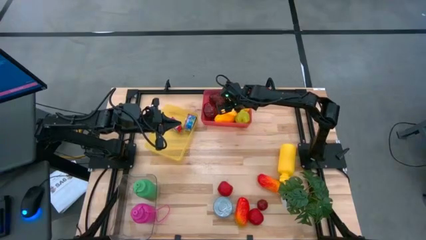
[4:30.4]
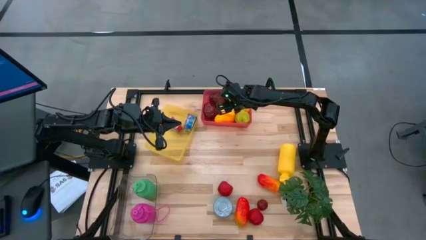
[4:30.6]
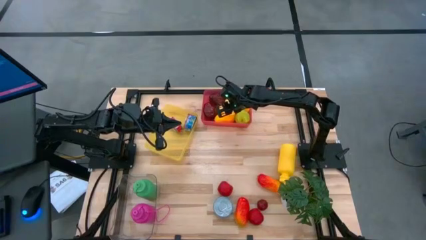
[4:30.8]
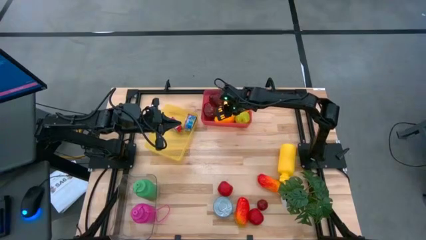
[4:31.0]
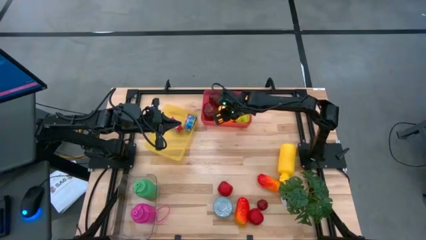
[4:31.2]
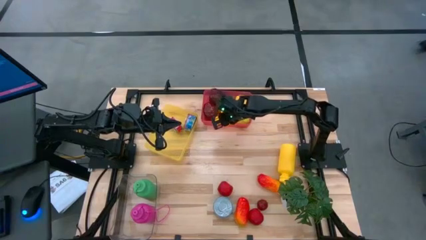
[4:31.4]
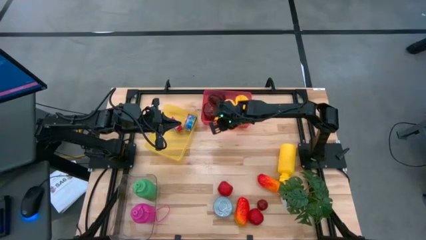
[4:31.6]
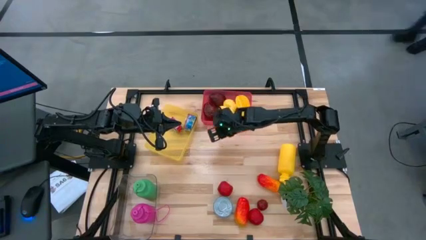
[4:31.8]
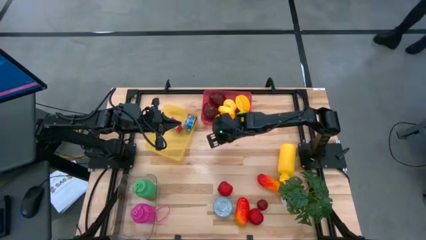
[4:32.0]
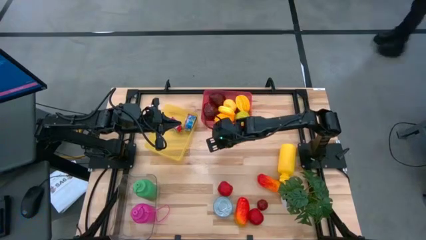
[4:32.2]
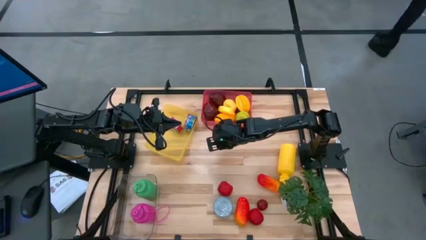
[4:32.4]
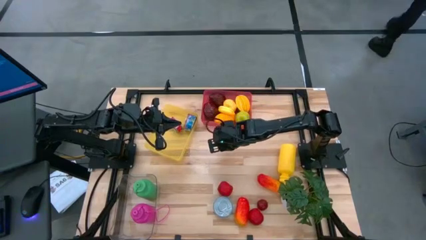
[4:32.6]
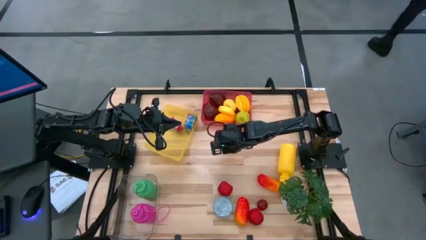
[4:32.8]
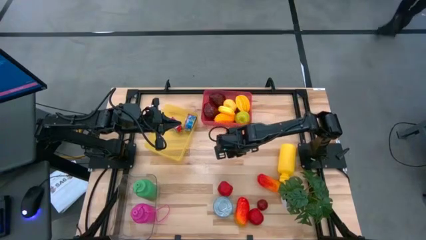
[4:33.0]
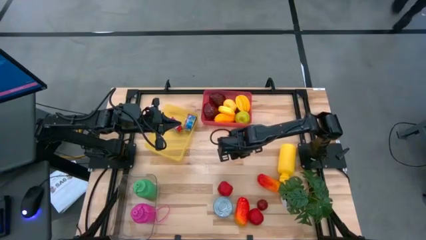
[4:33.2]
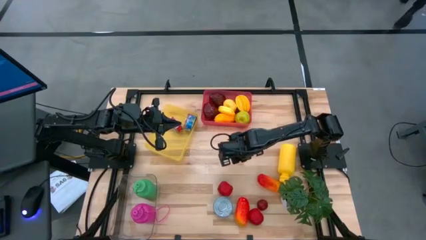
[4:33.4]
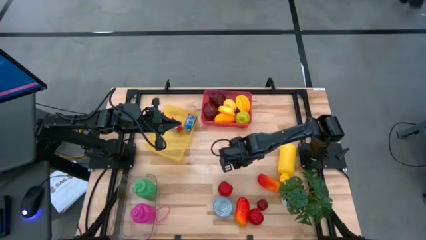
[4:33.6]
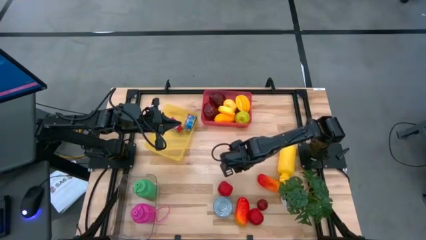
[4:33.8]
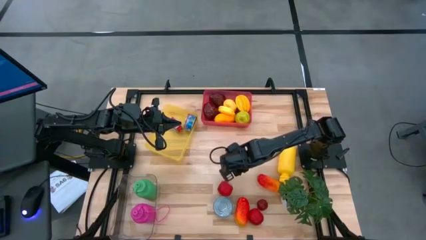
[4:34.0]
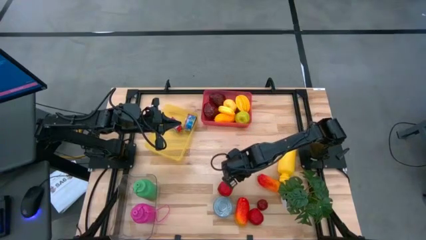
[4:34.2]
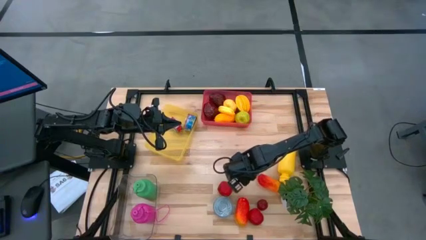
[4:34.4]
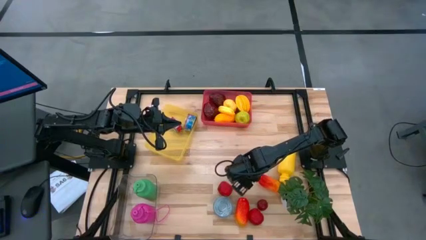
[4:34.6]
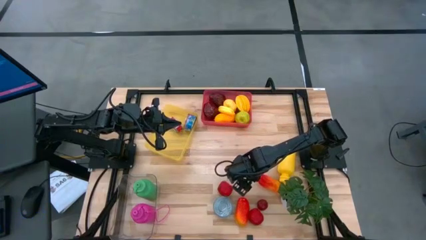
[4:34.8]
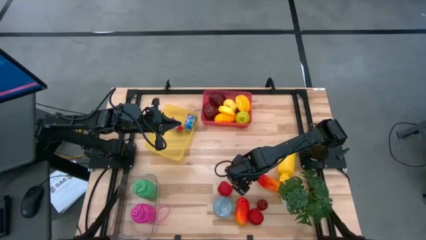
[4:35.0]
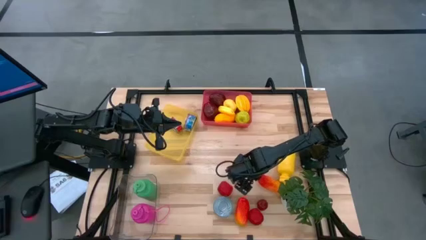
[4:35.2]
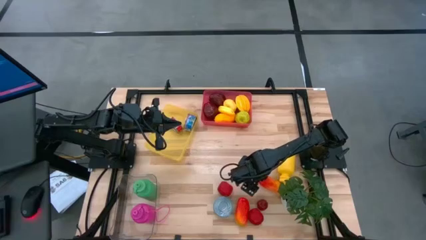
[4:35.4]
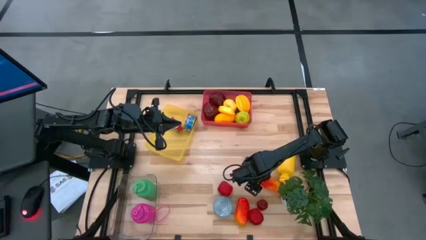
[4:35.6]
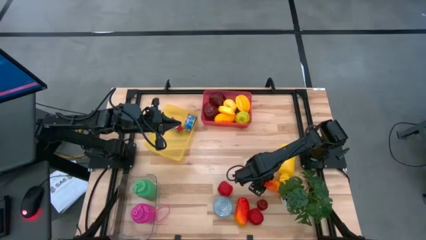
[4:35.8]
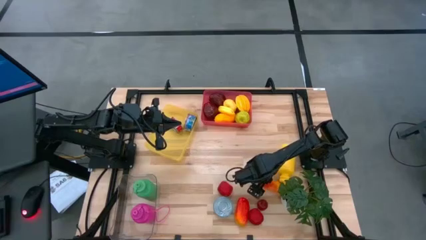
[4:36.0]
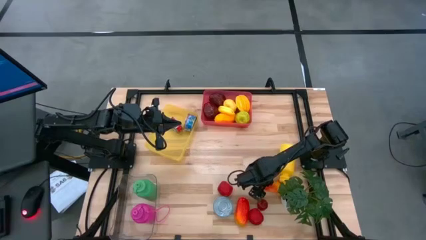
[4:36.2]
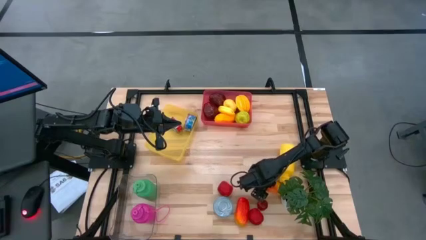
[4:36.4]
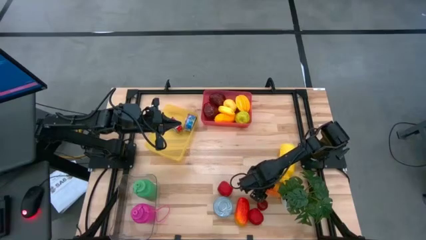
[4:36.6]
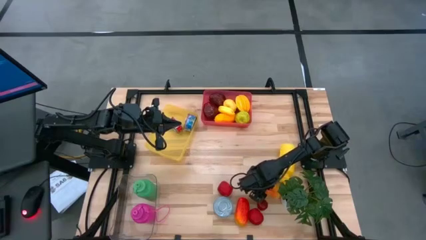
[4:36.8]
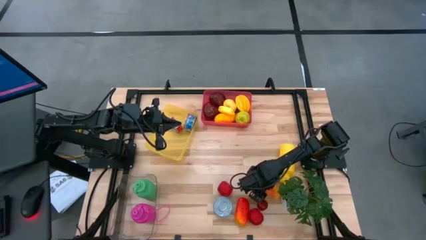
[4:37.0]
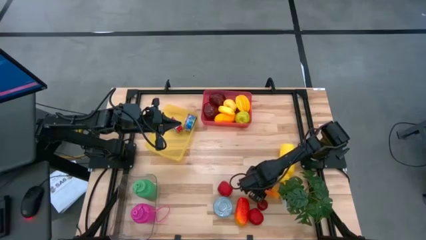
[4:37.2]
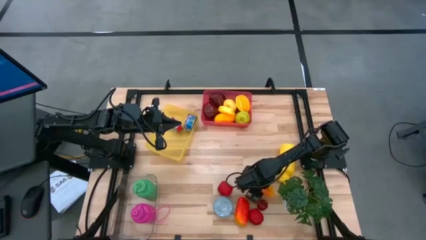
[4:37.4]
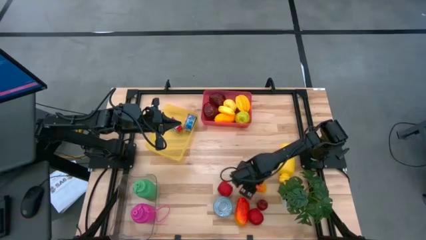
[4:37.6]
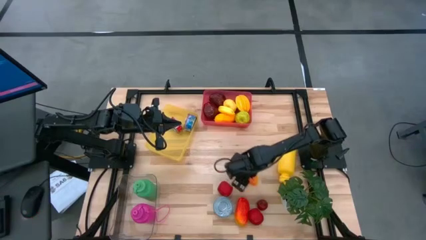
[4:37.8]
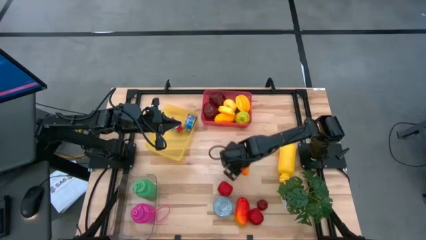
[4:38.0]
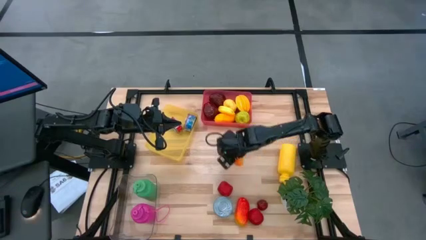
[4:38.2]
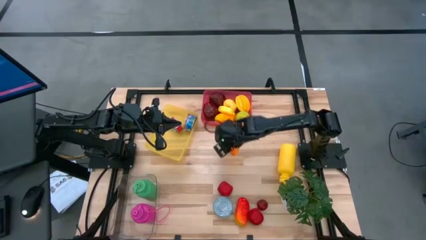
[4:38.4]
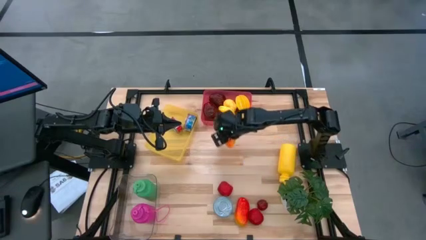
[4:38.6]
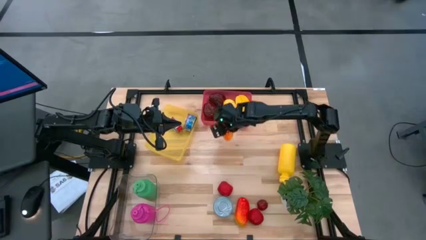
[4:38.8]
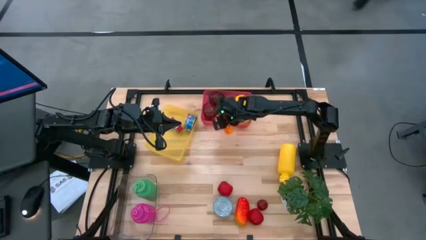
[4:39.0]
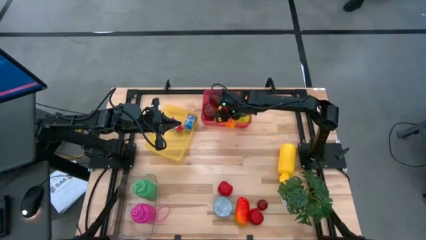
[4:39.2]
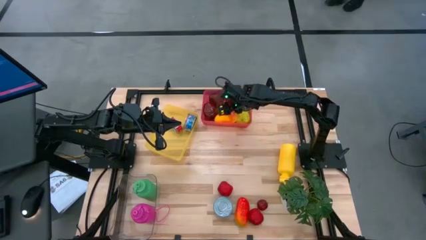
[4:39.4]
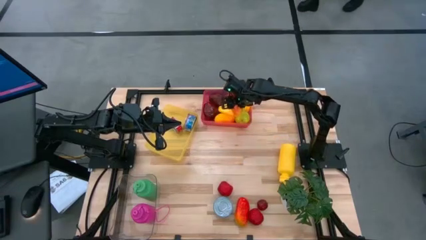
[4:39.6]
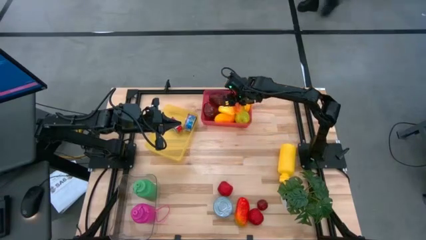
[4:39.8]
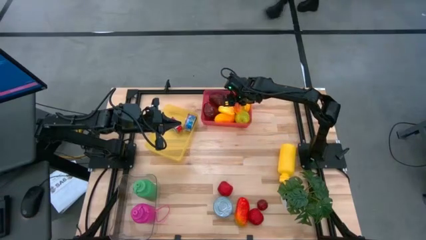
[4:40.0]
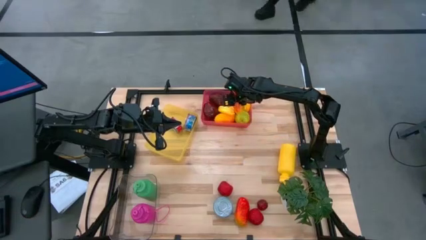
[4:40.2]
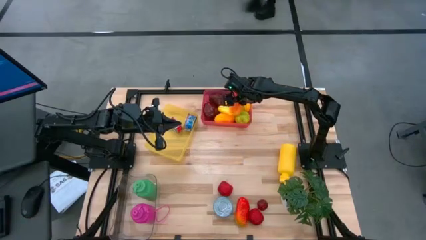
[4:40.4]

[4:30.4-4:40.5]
Task: Pick & Place Food Item
Put the right red mango into the pink bin
